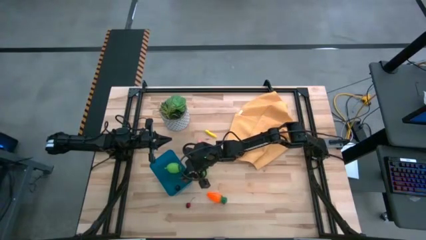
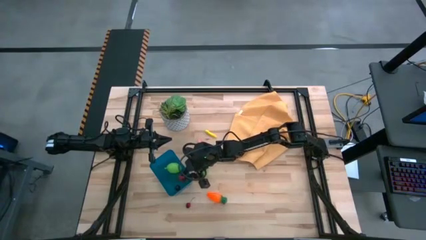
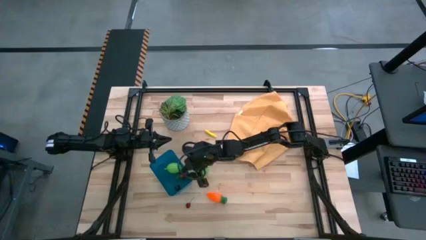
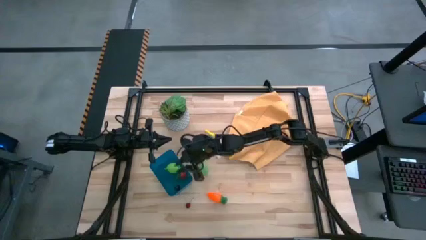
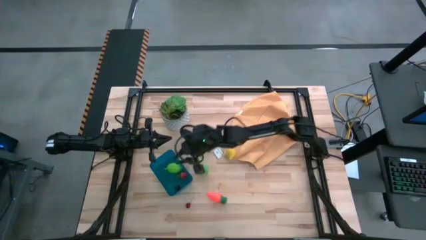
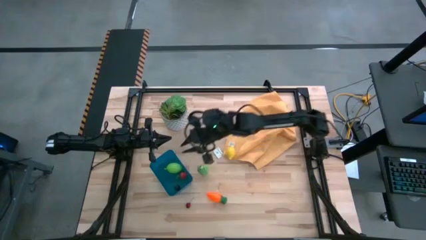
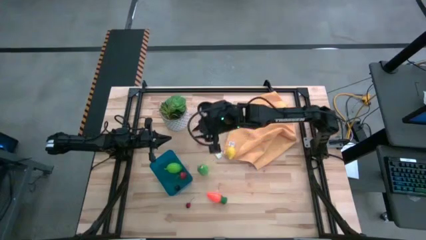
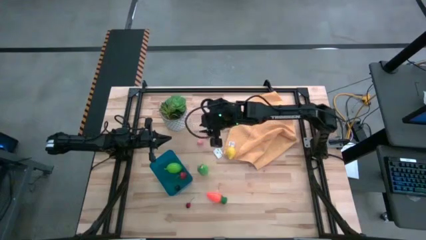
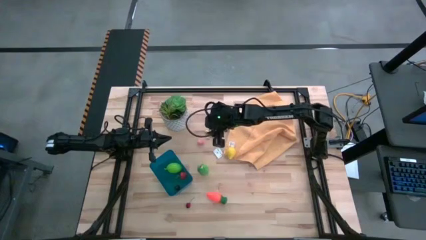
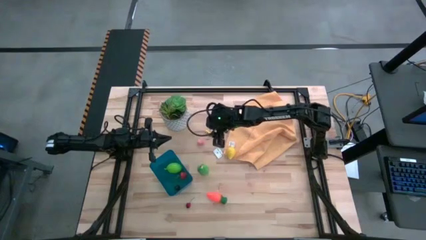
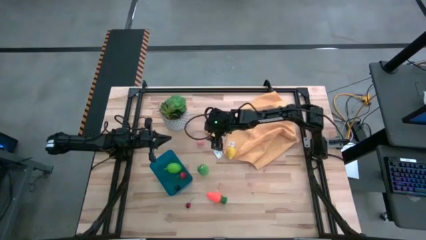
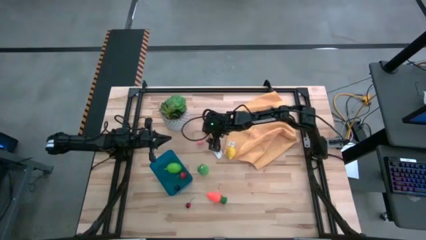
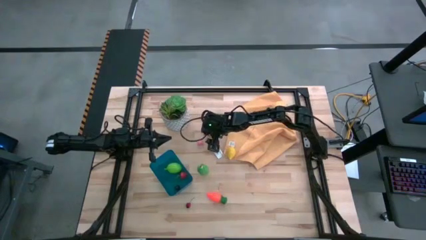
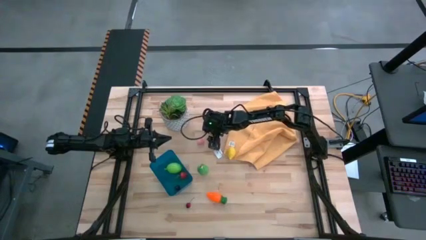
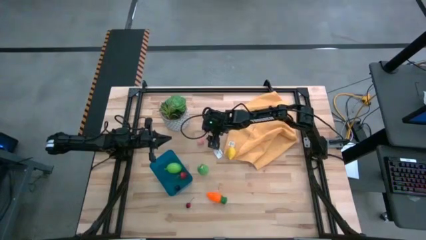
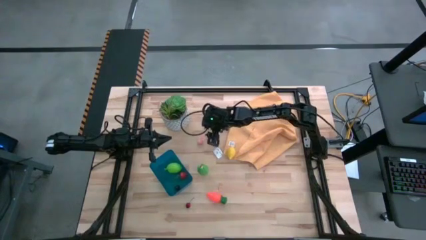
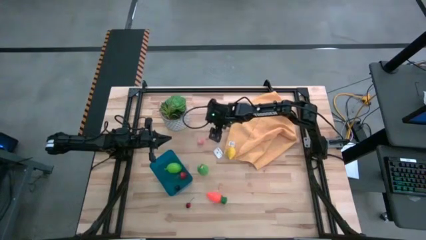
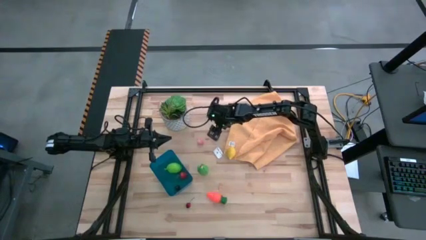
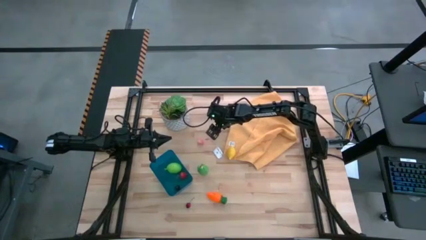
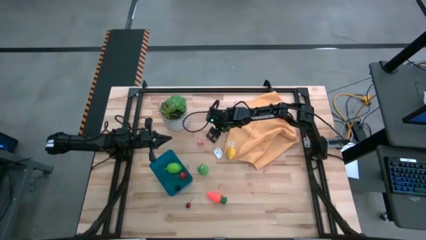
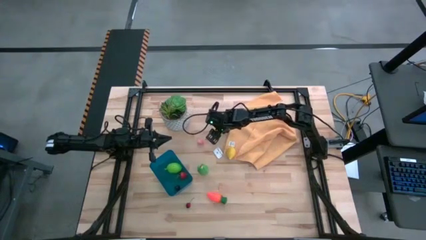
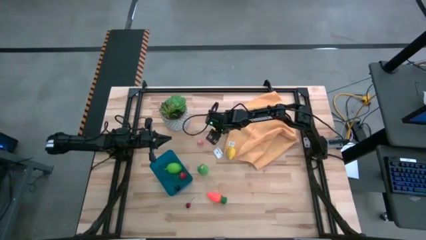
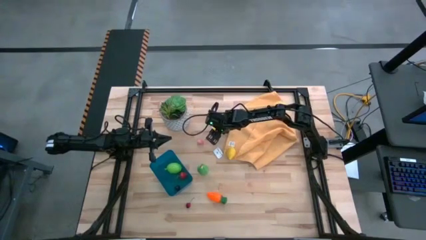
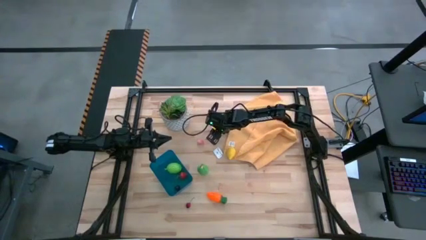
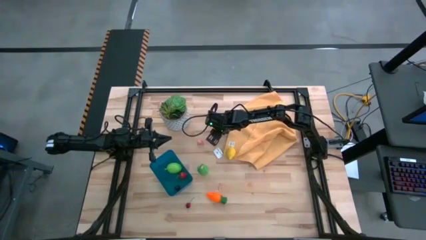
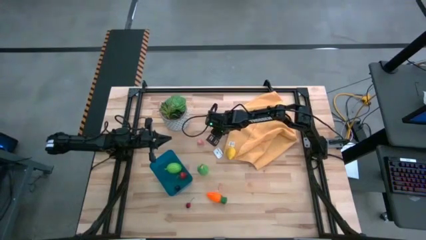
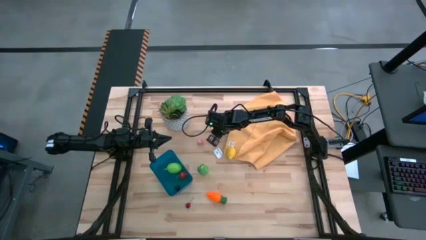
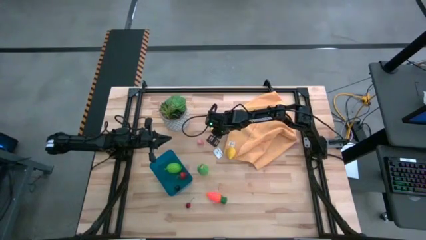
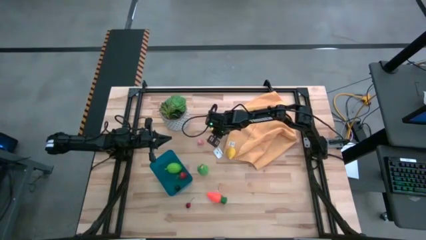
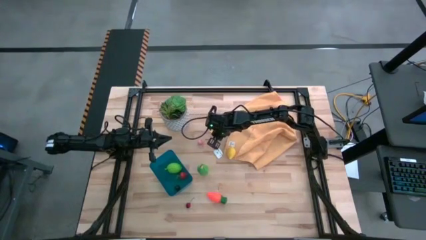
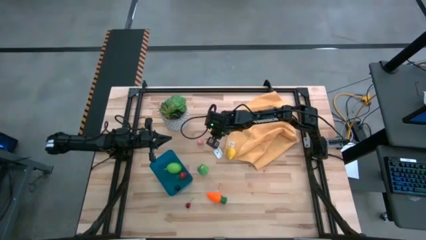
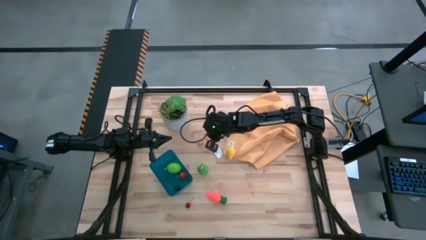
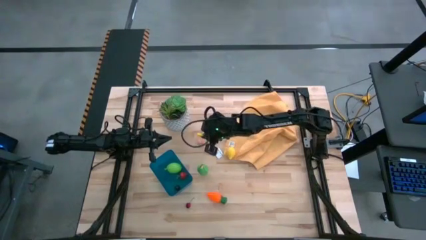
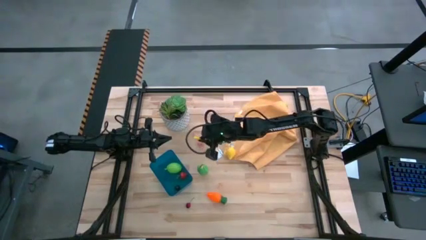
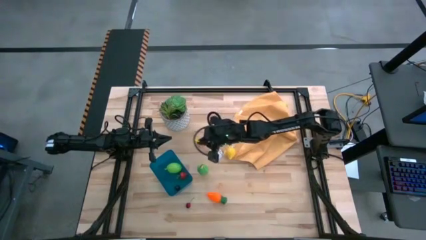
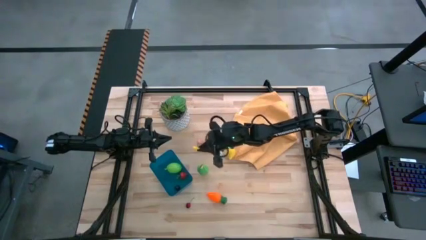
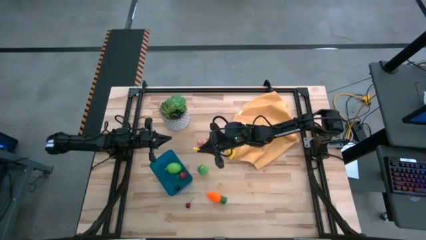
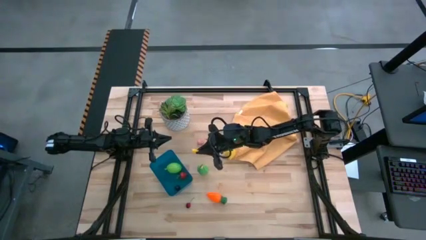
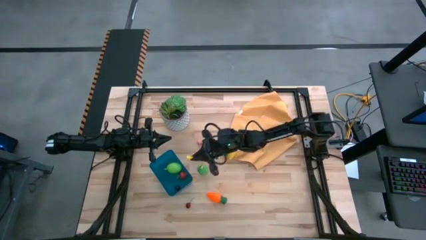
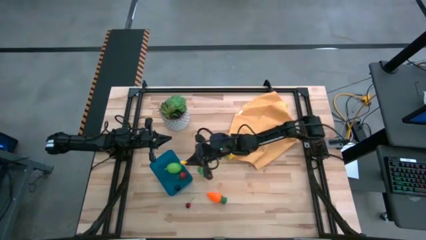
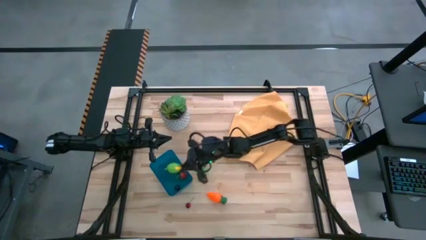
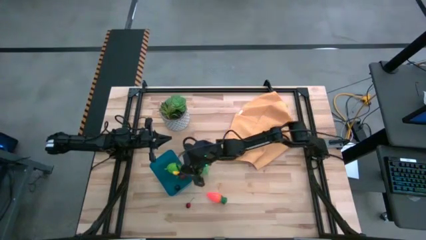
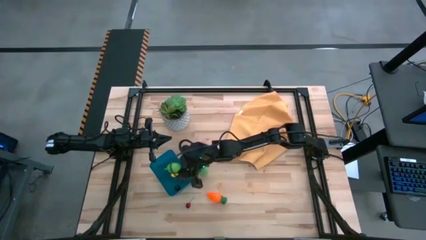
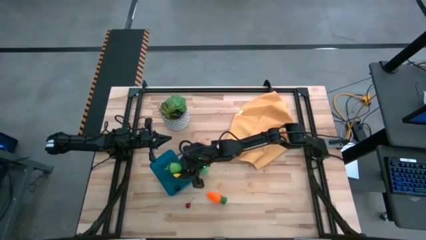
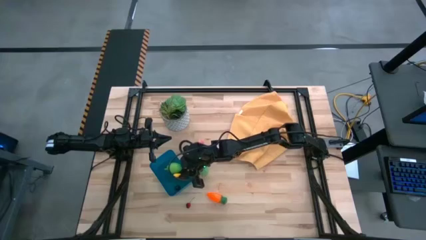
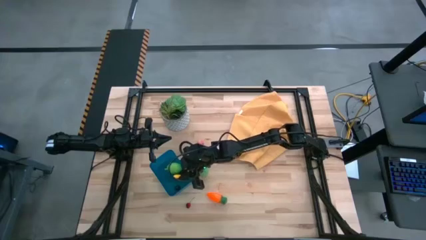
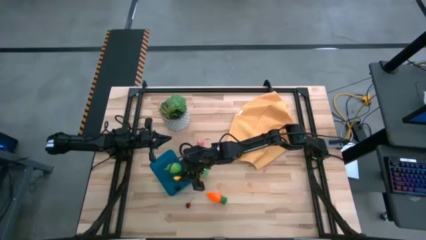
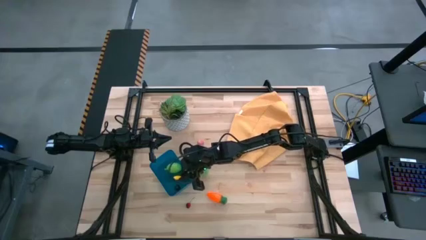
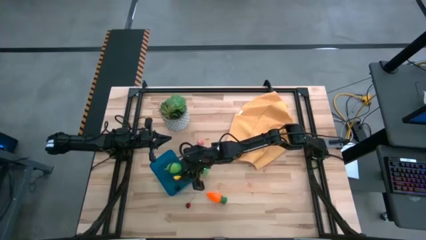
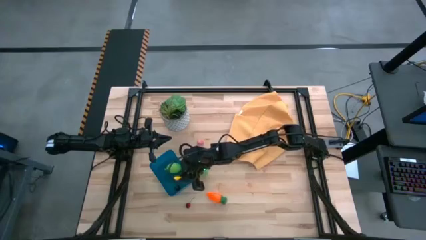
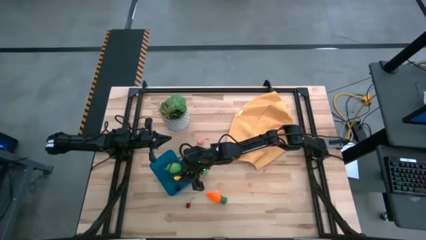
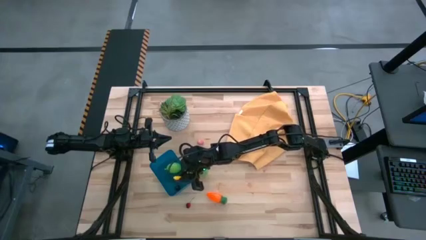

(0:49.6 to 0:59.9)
Task: Pick and placing Produce into tupperware
Put the yellow corn into the blue bin

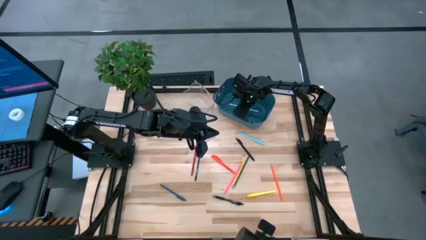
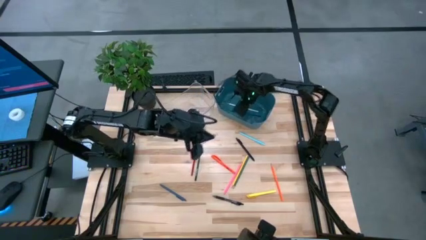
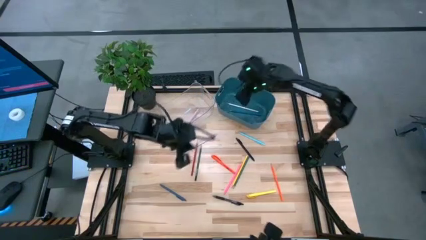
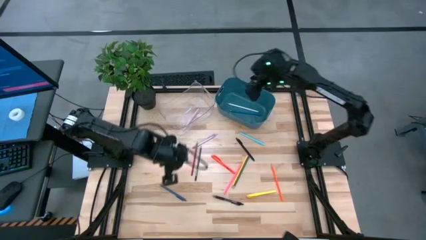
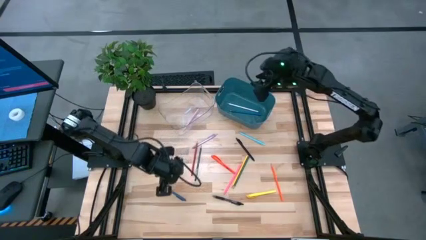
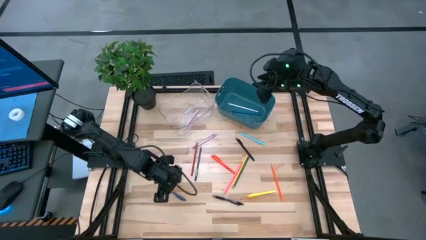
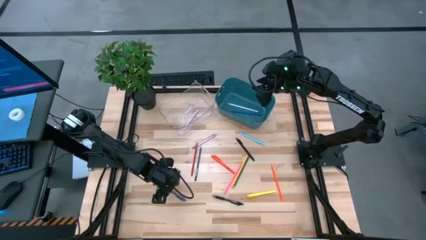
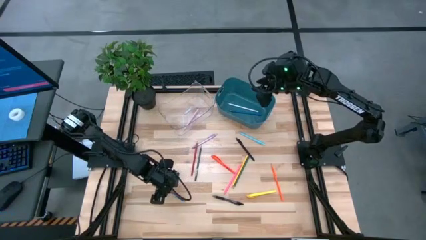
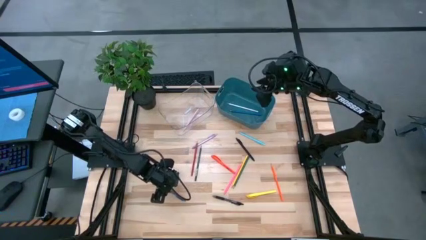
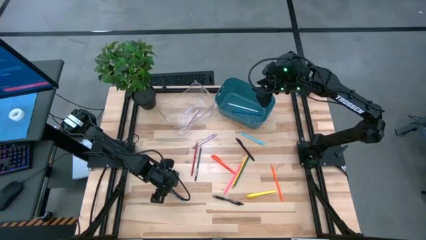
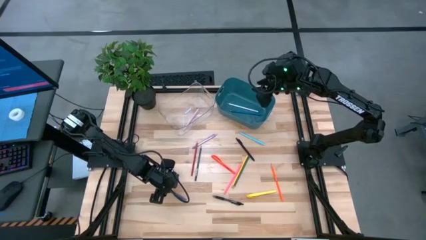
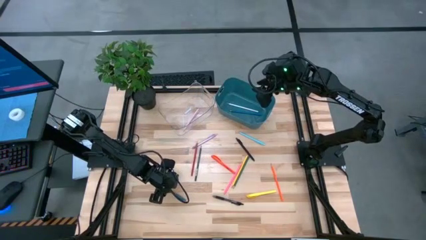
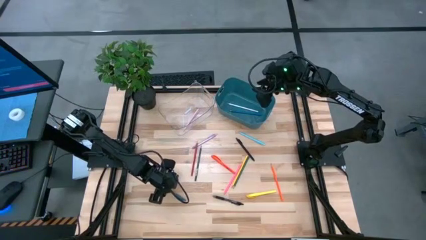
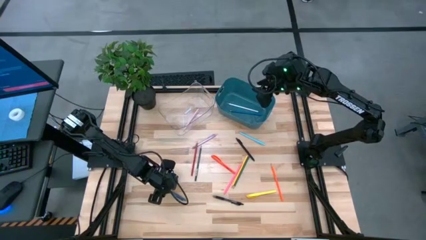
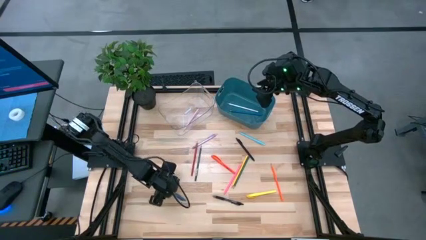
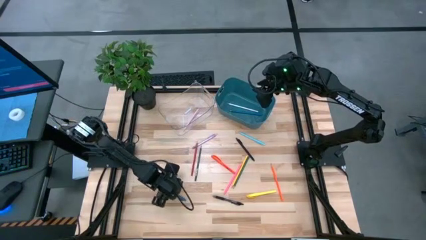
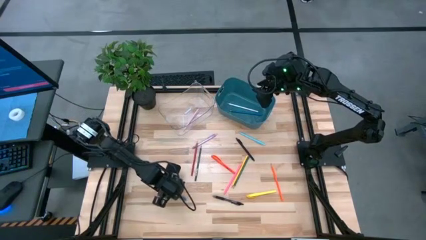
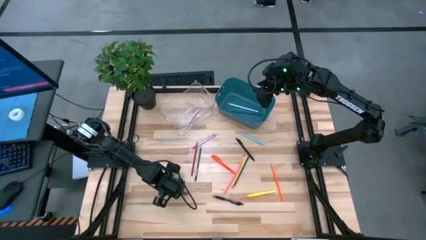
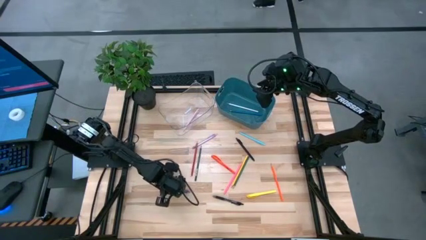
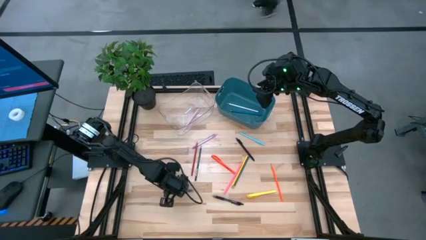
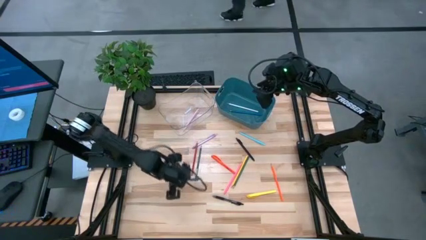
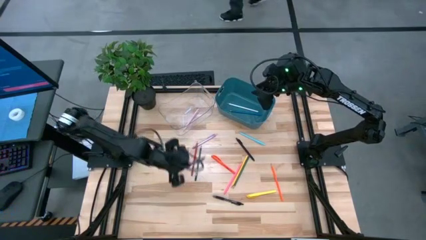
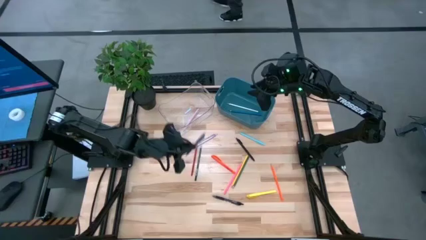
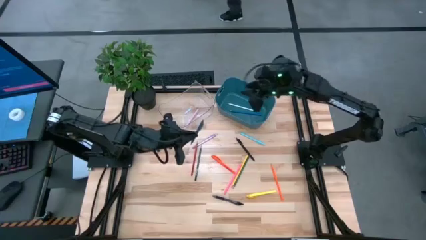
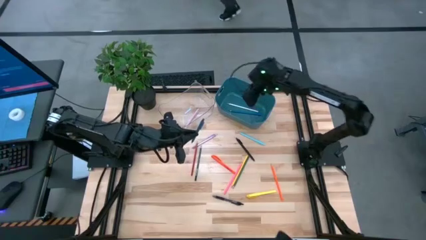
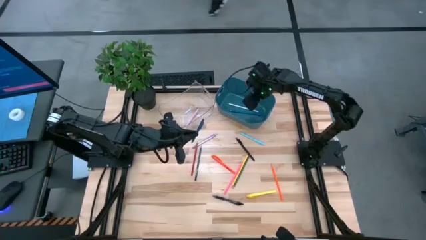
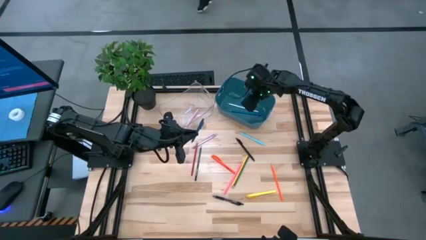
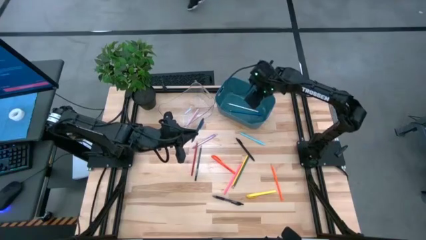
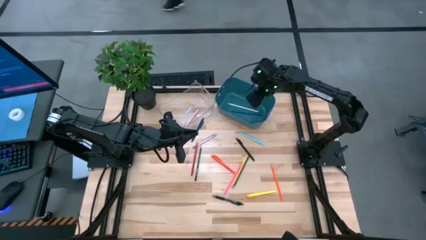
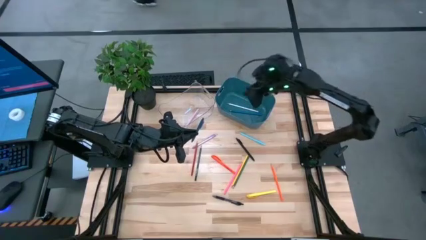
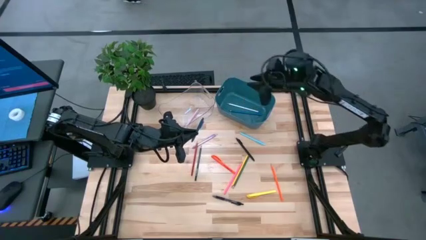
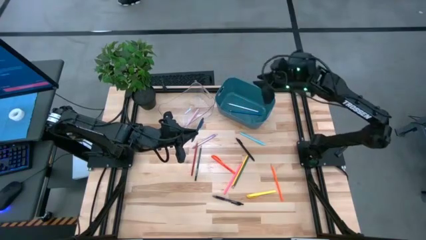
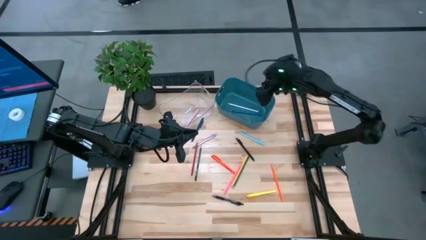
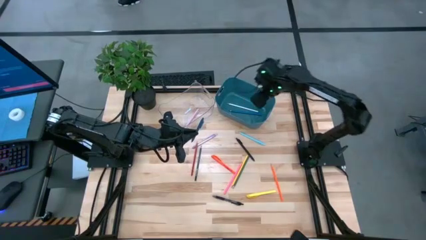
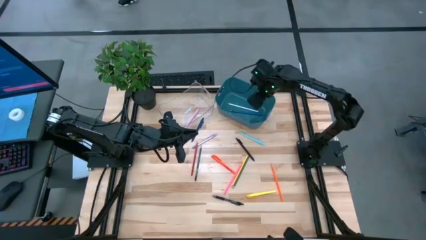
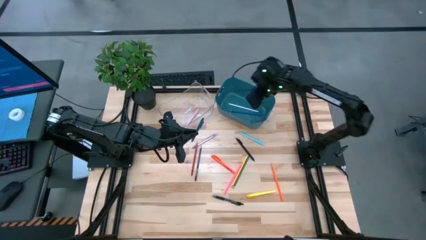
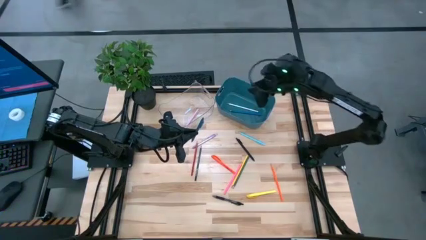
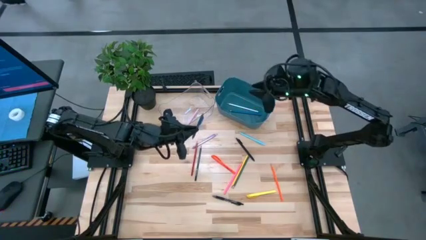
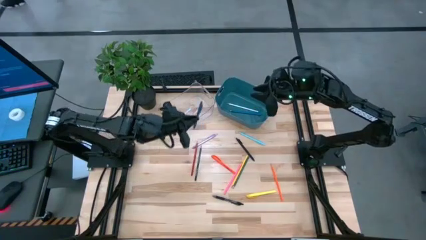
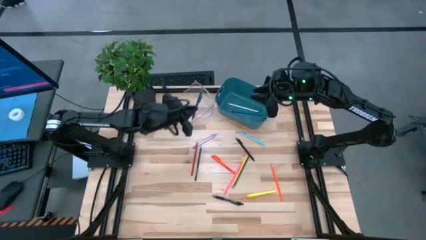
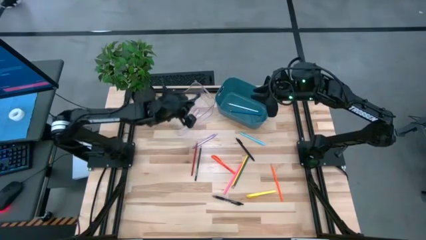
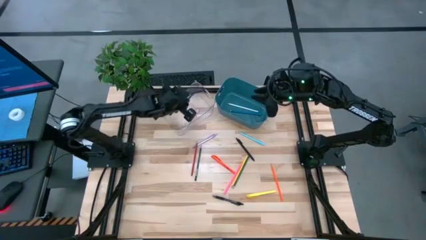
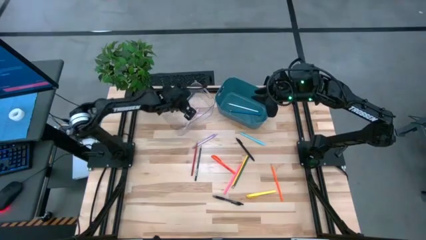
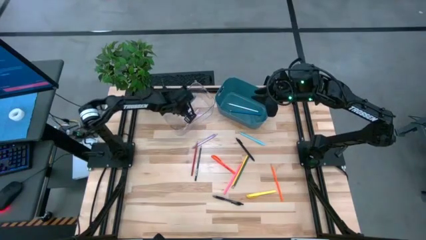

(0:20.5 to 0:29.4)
Task: Sort pens & pencils
Put the blue pen into the transparent bin
